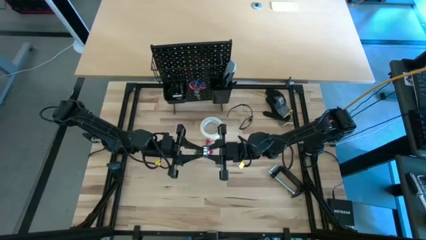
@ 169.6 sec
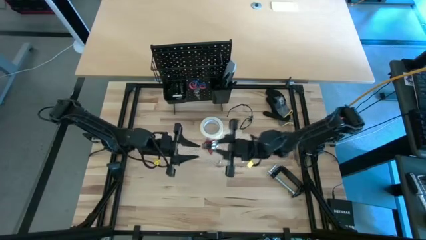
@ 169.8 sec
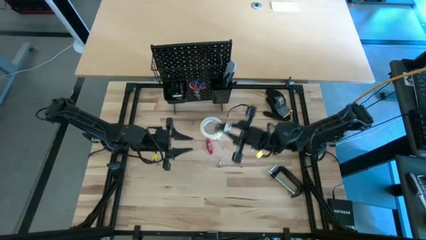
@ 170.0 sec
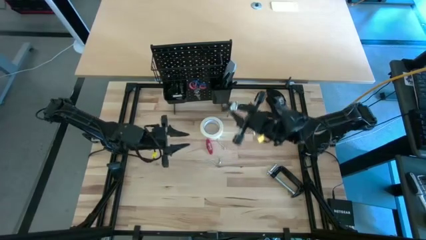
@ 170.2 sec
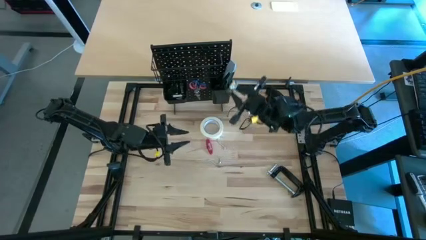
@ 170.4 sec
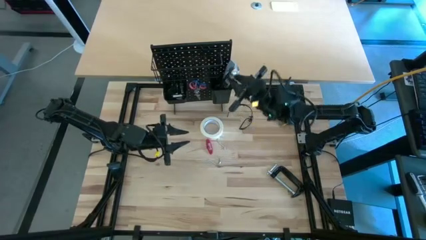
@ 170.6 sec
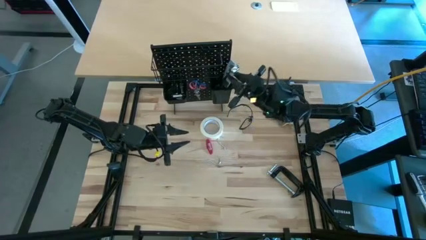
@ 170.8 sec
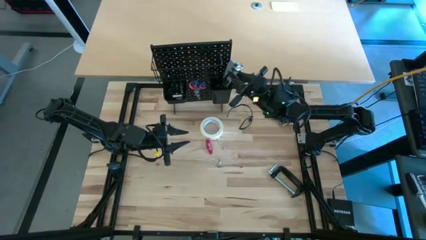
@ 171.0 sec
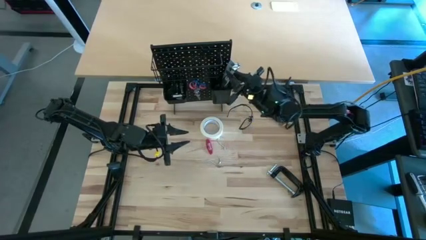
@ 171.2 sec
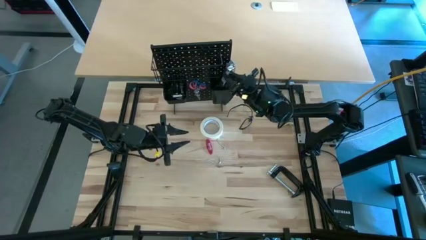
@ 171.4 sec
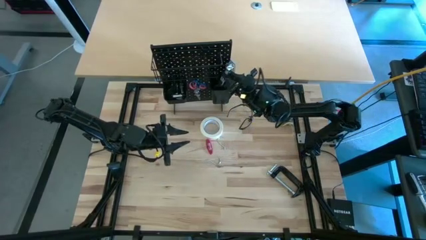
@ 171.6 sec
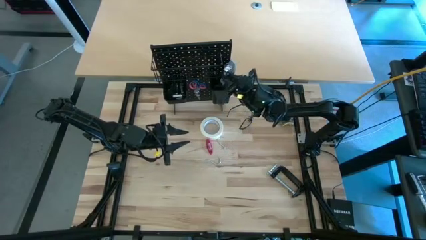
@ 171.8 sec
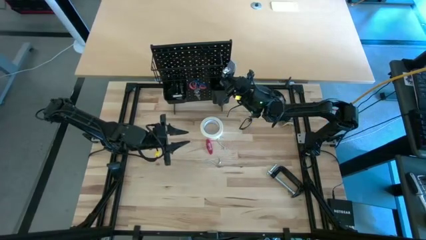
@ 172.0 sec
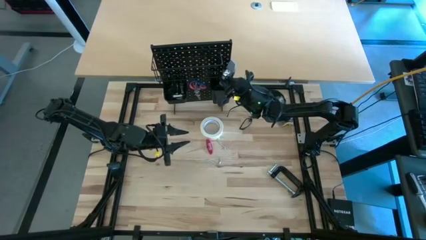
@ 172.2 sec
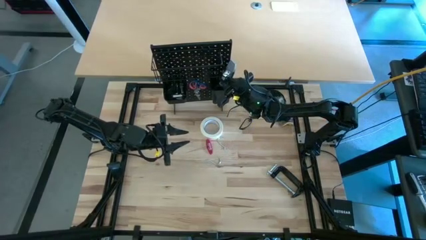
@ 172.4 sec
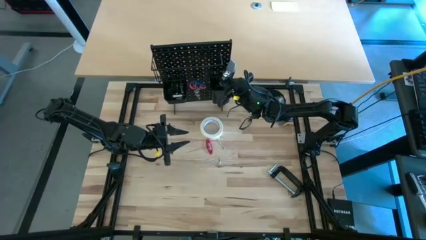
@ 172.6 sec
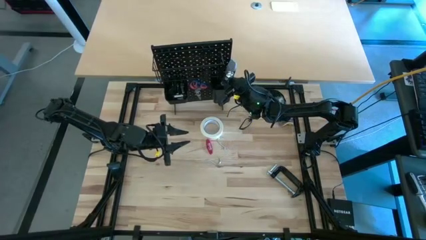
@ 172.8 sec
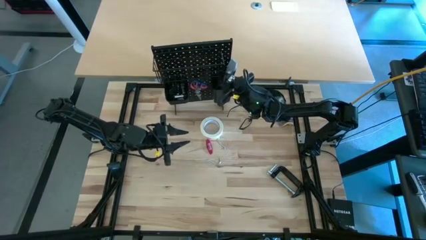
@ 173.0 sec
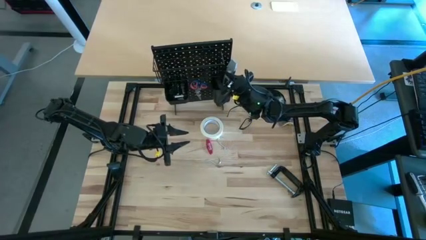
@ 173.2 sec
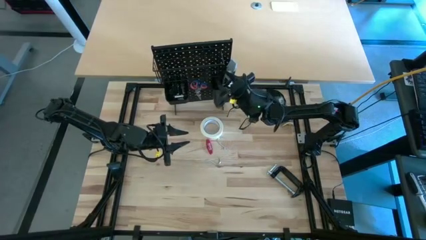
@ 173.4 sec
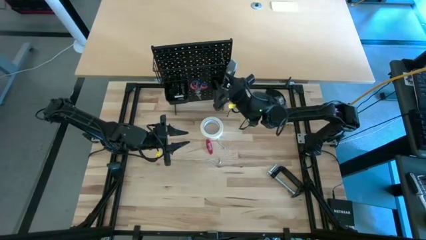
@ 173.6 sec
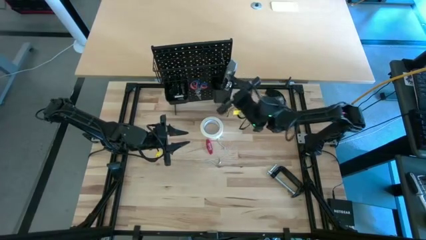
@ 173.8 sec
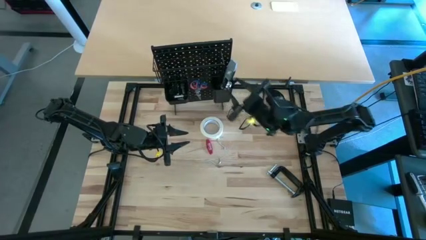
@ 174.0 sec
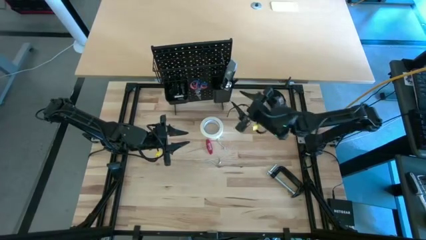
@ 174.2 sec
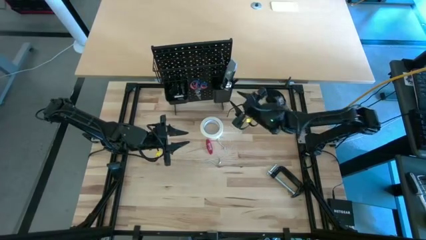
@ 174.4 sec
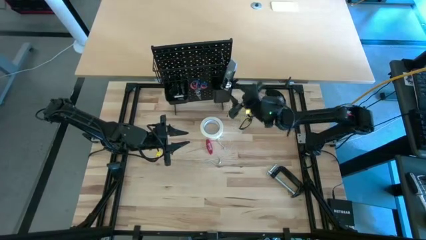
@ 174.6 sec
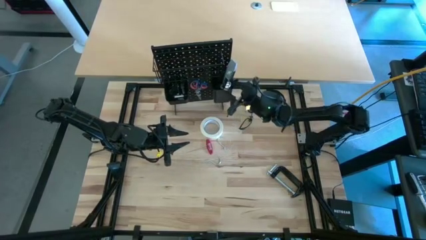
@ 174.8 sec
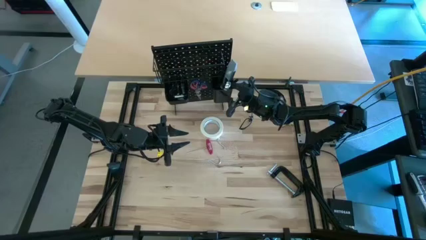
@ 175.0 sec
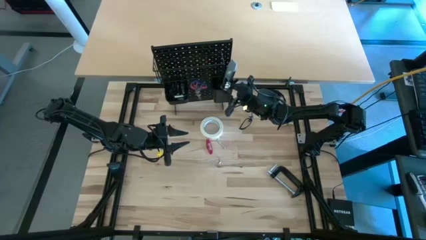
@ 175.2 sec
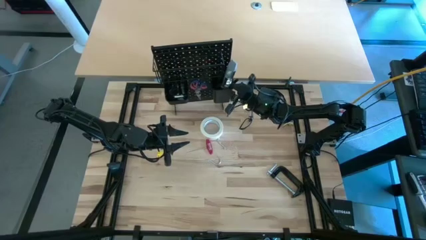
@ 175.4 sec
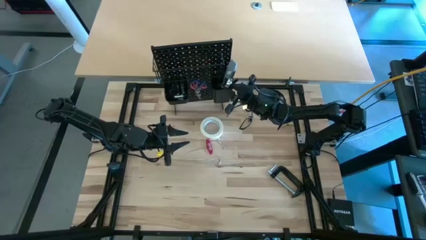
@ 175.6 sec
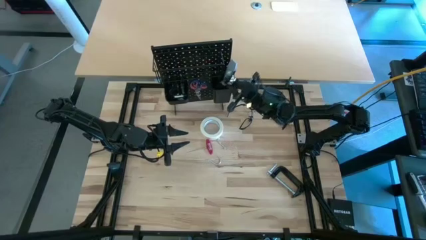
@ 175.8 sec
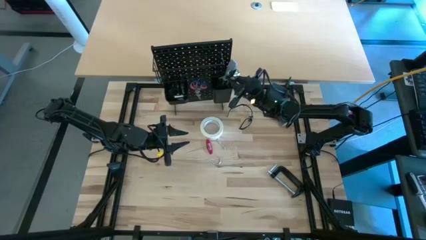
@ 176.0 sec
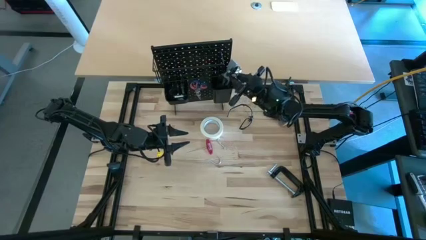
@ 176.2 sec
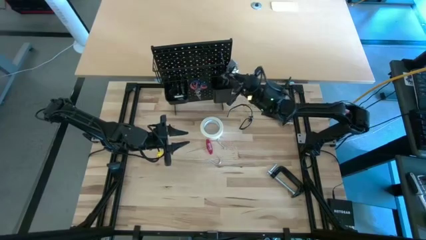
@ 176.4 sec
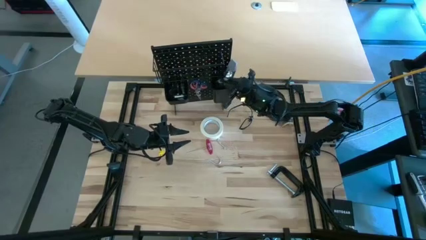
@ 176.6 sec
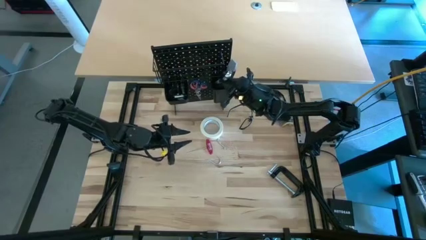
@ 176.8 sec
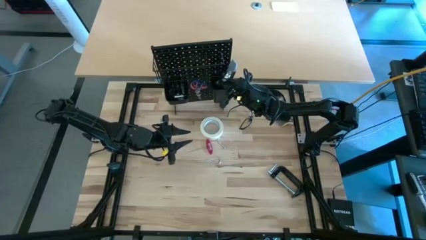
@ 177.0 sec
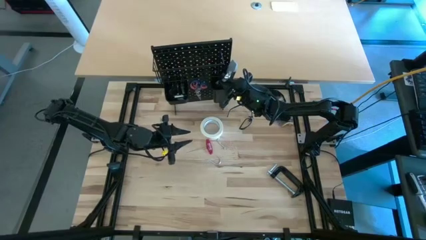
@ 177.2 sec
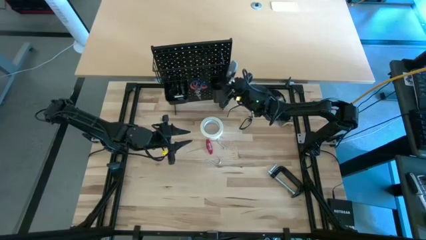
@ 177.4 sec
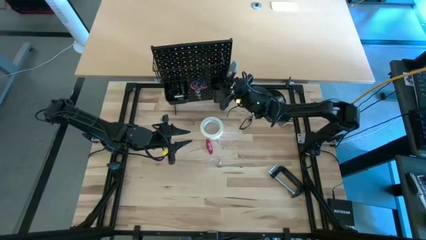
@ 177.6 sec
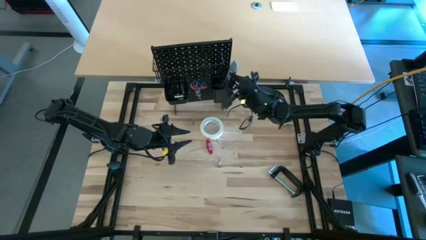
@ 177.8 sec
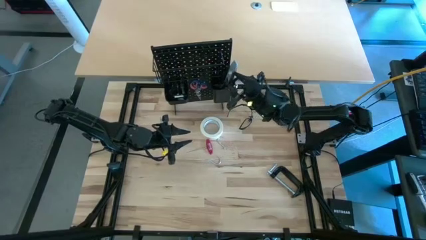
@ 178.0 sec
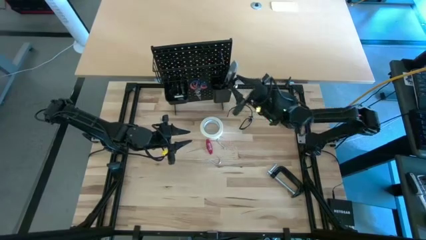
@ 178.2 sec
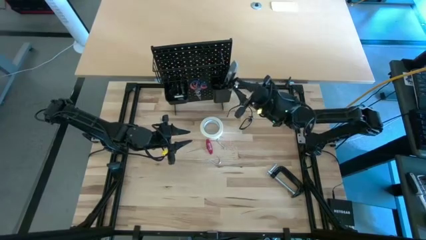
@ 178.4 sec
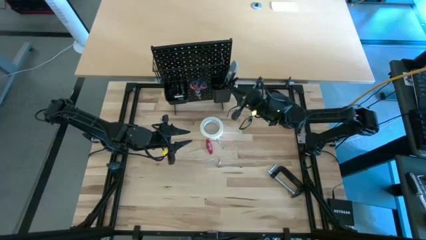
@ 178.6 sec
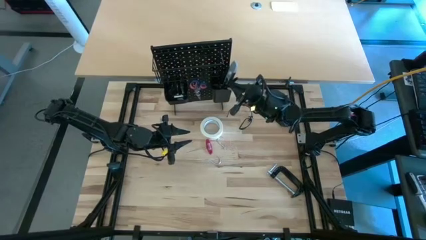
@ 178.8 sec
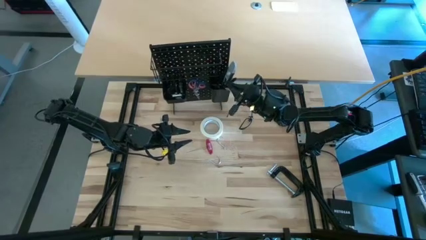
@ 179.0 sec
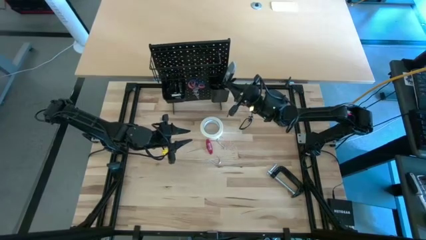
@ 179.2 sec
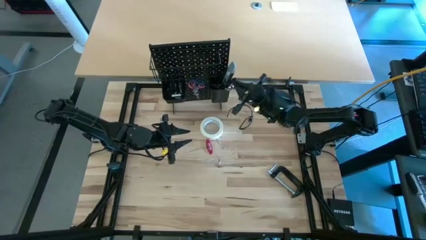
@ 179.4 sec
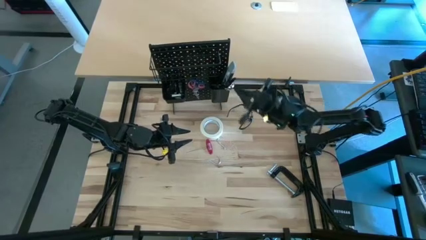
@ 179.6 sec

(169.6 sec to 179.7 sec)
Task: Hang tools onto peg board
Put the silver ratchet wrench into the left black bin on the peg board

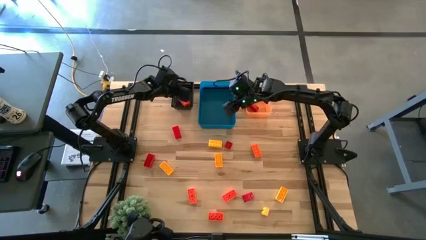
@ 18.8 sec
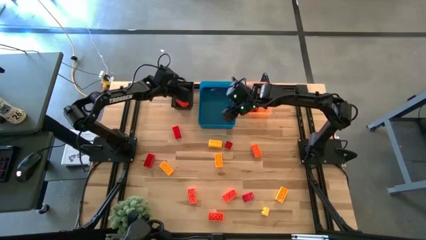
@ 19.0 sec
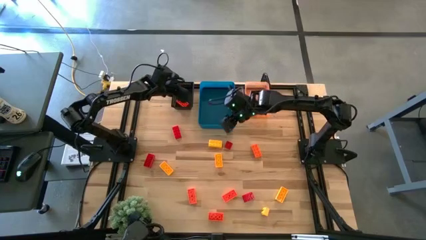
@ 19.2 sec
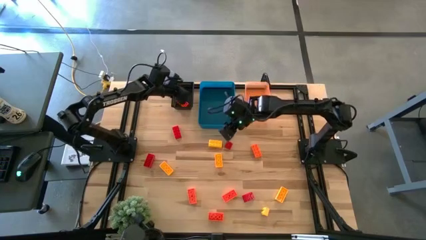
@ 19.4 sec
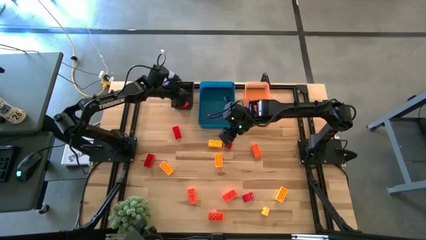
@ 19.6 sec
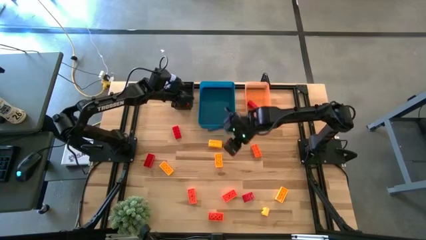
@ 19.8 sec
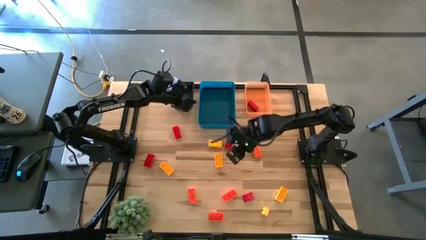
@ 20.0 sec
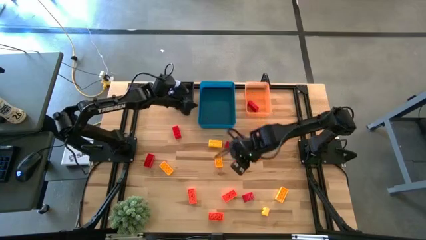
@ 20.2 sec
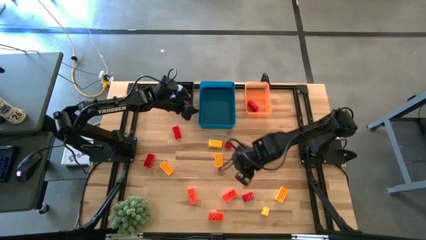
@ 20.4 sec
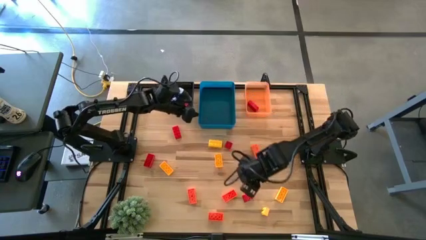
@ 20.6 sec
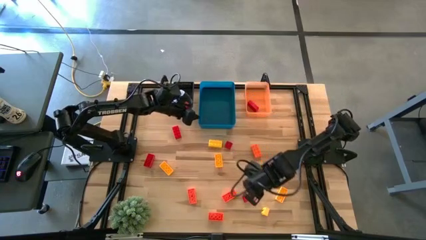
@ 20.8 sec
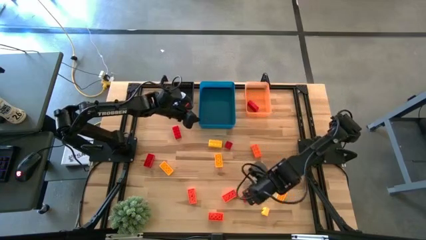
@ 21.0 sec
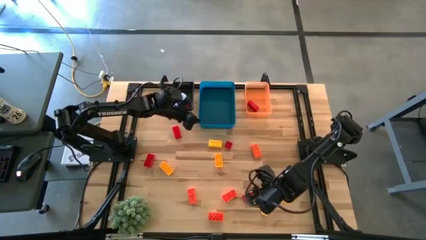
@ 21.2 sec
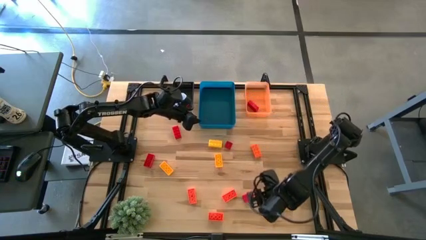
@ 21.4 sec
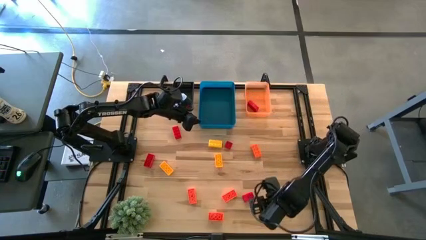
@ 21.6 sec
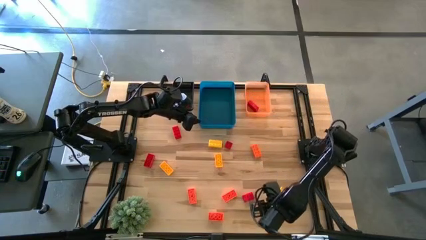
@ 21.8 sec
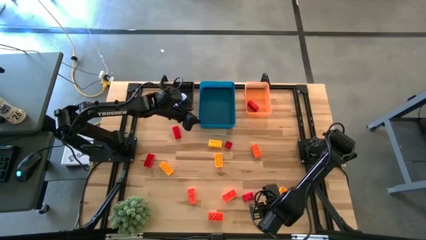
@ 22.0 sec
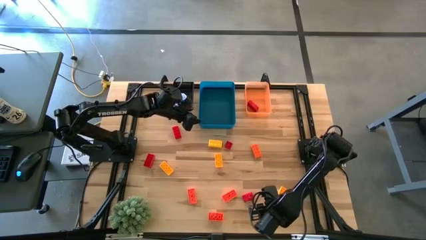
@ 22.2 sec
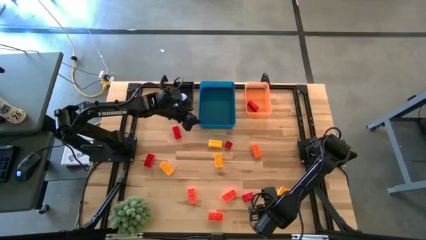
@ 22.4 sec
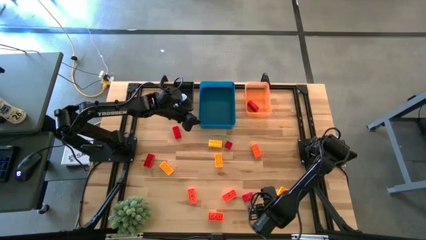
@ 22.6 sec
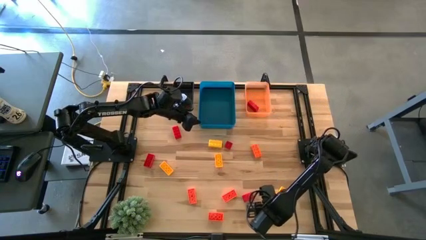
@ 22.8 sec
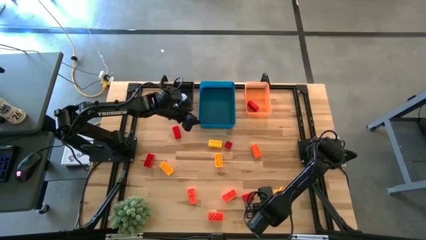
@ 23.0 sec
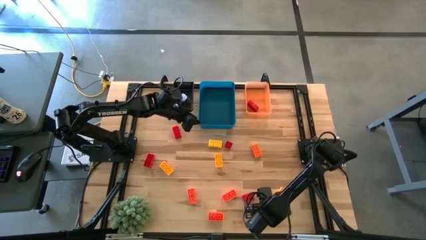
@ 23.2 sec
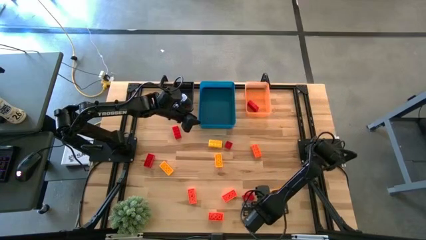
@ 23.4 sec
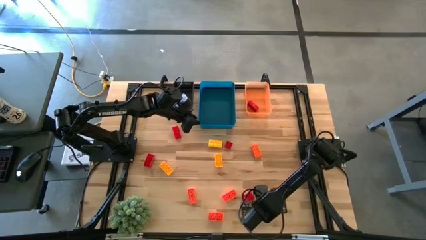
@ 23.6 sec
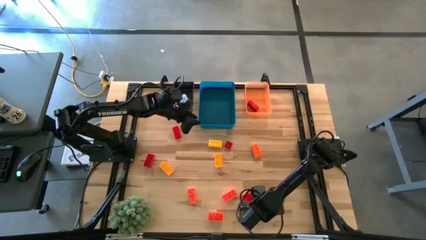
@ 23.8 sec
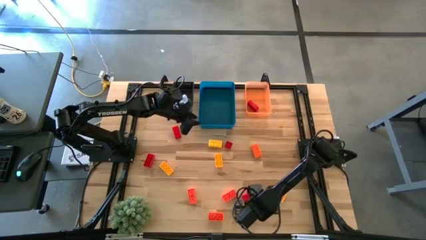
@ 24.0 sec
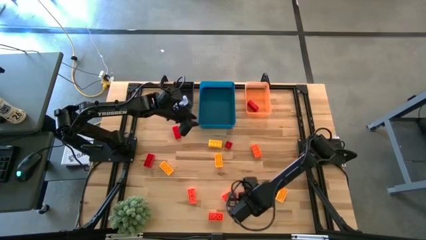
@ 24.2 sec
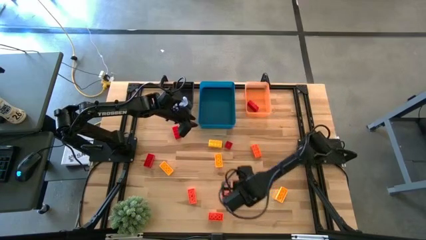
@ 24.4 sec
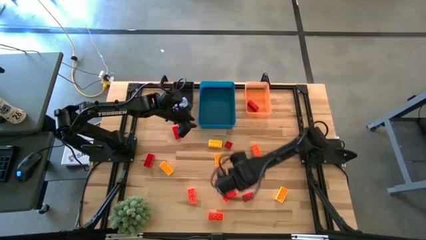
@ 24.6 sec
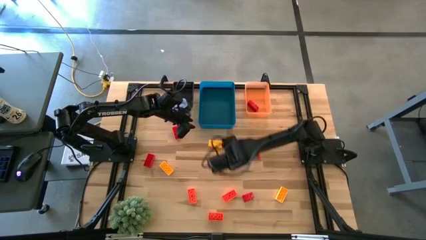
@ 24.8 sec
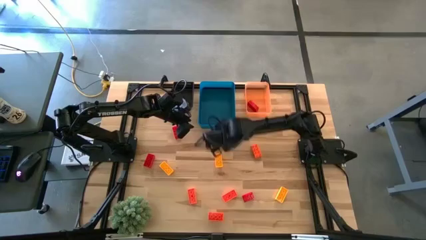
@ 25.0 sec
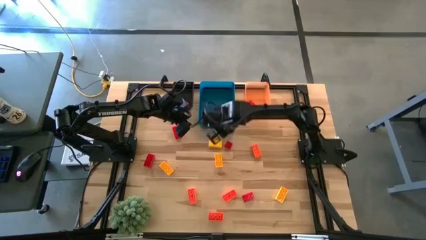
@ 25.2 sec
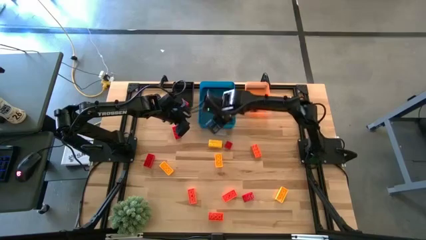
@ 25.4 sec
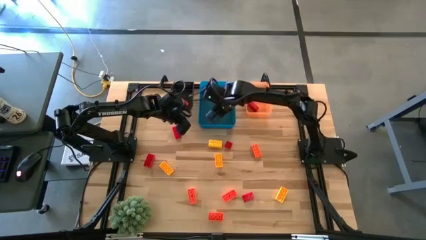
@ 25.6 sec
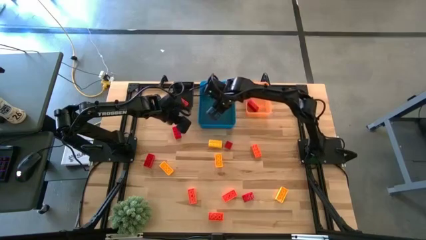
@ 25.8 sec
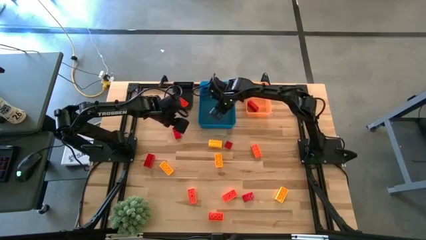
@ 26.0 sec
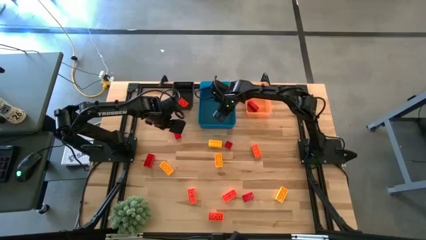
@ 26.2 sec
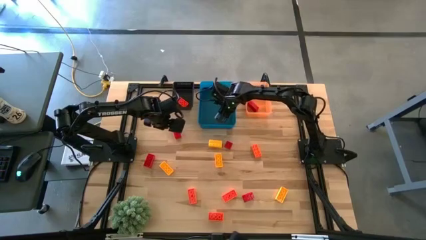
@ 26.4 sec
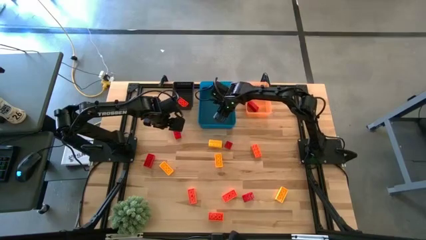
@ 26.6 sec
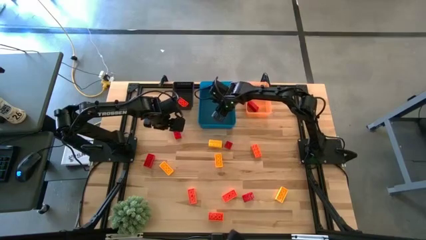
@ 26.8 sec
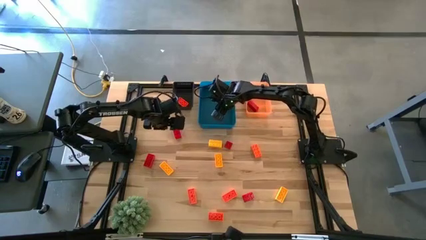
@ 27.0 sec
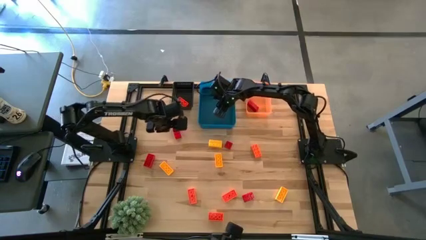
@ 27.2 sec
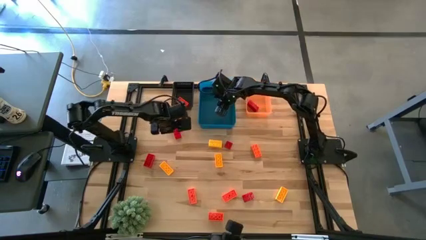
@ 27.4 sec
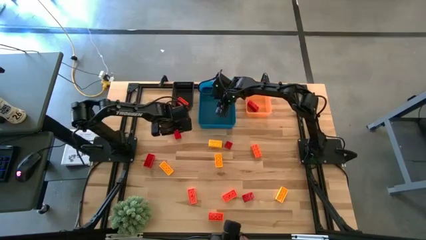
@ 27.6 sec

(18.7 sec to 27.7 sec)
Task: Sort & place blocks by color
Put the yellow game piece into the blue bin
